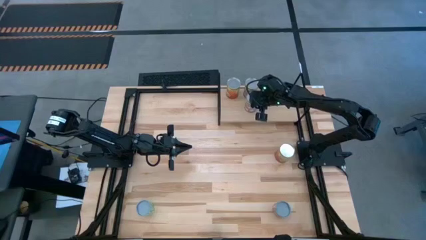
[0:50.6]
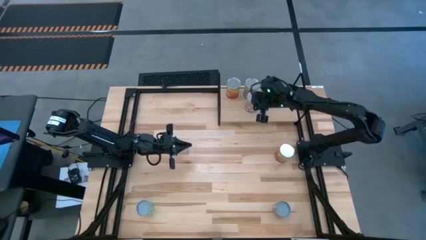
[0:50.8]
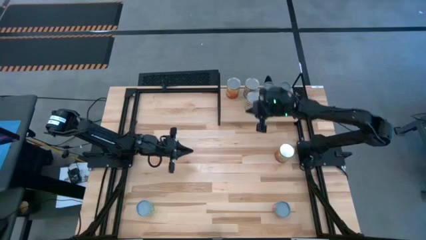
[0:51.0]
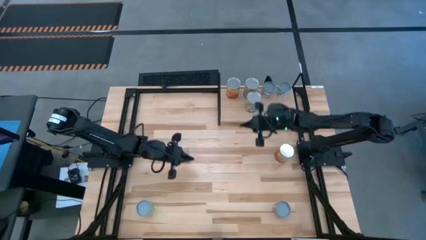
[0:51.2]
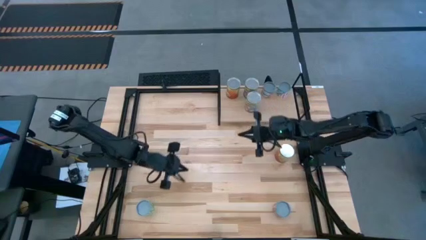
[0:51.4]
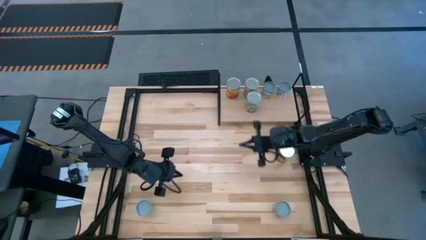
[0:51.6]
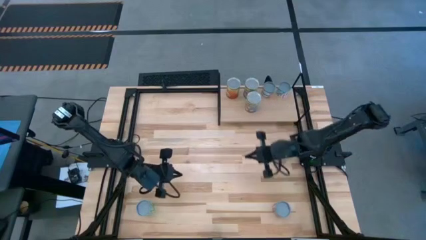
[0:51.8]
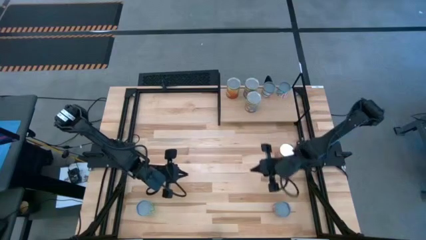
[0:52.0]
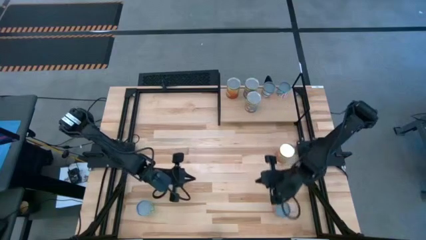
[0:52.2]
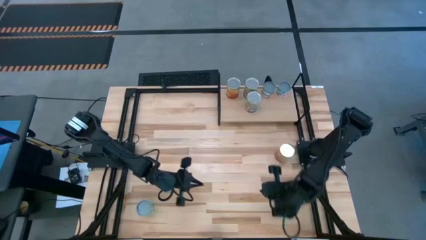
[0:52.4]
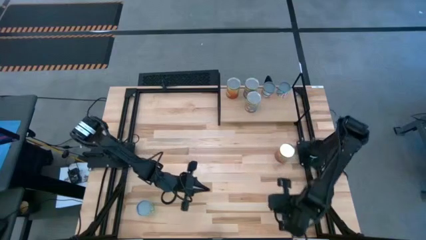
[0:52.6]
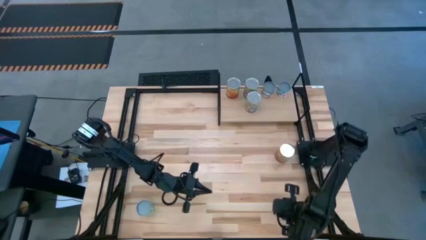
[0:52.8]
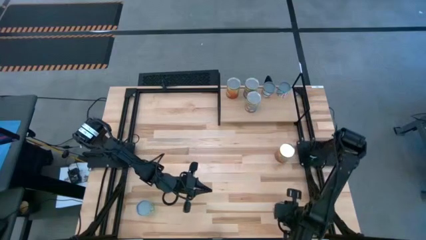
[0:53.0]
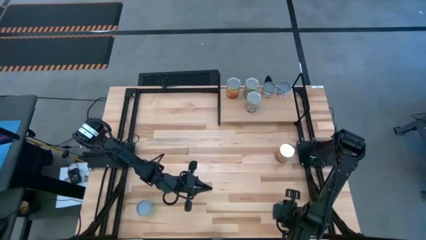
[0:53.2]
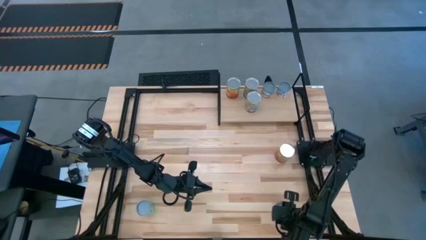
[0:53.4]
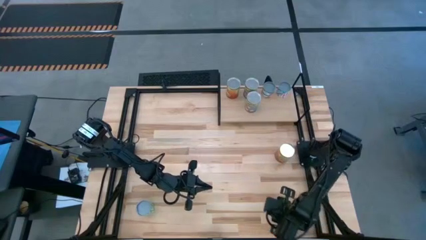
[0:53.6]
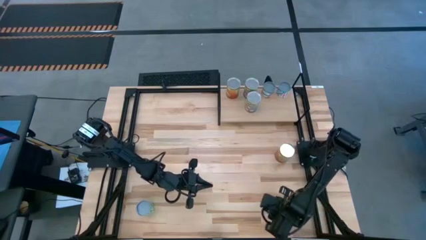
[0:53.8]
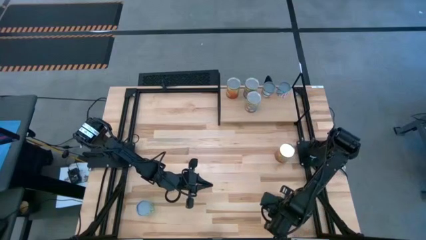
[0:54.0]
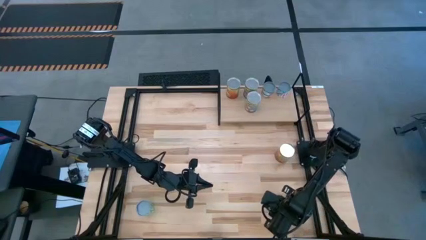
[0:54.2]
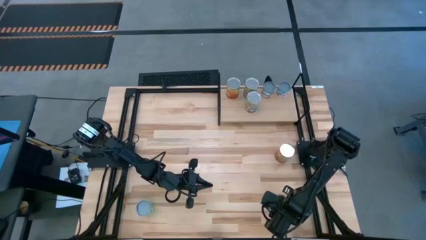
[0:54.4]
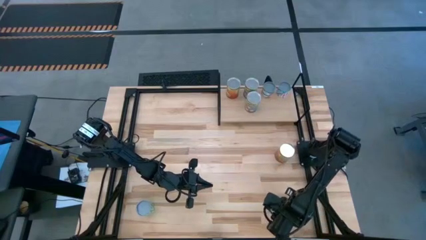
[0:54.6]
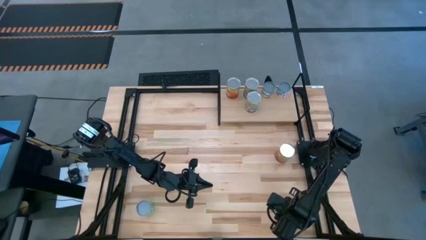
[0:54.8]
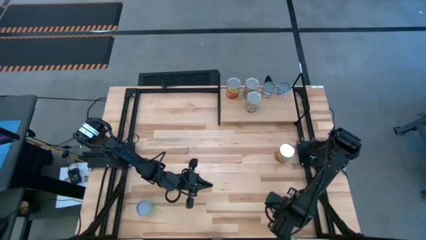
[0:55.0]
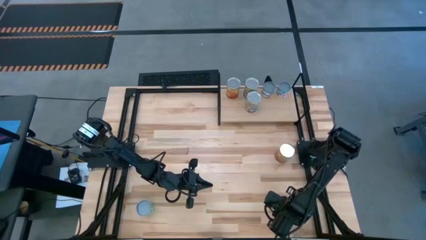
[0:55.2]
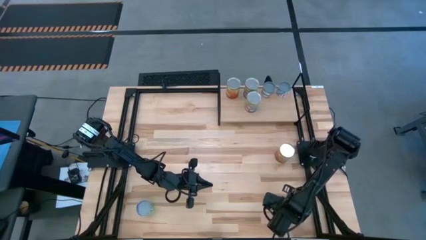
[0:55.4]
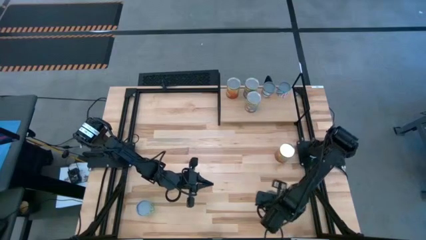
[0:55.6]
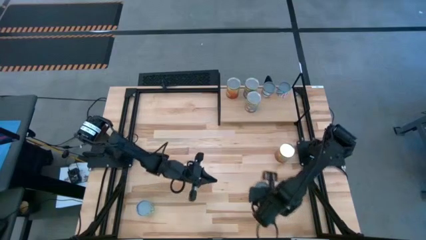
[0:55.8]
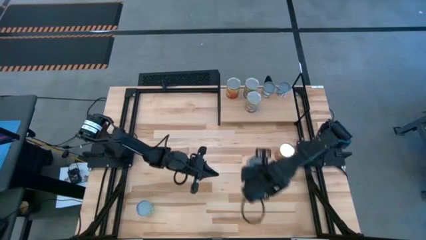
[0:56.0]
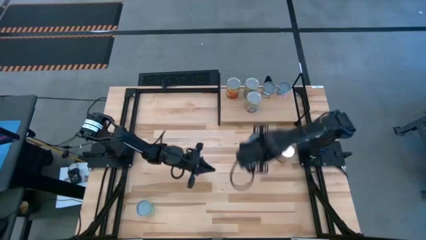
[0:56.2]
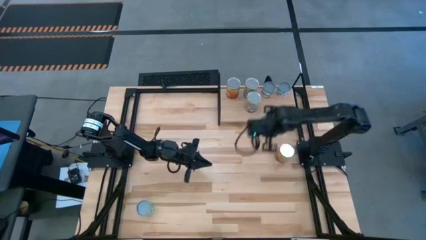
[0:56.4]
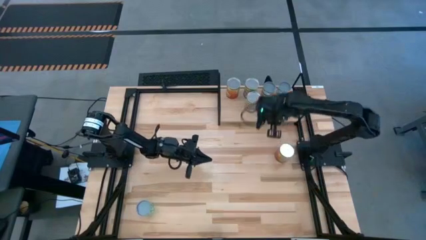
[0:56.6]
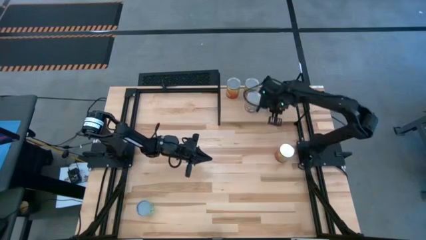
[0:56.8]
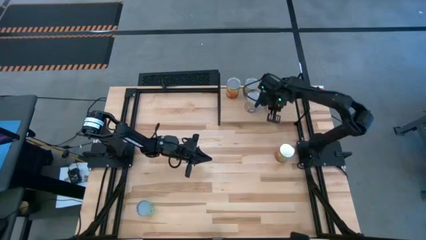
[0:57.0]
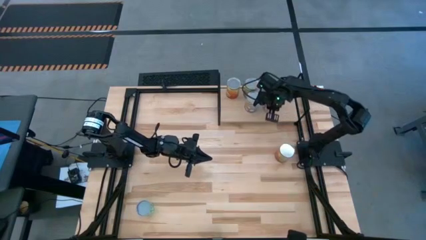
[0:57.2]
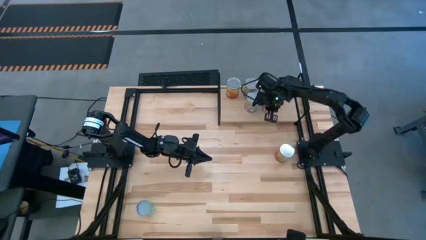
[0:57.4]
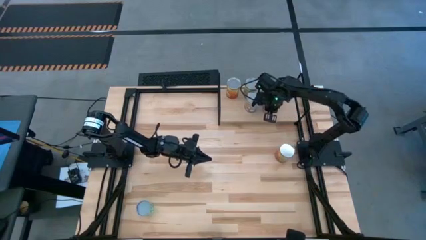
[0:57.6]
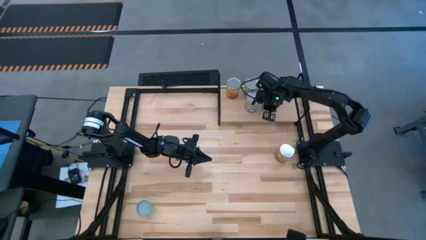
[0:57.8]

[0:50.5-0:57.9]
Task: Pick and place cans onto a shelf
Put the blue can on the shelf

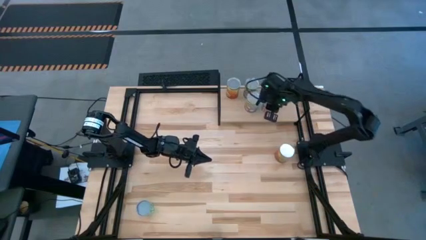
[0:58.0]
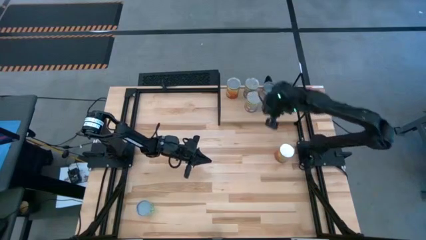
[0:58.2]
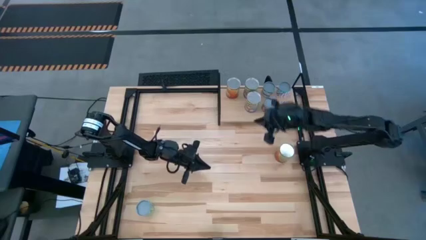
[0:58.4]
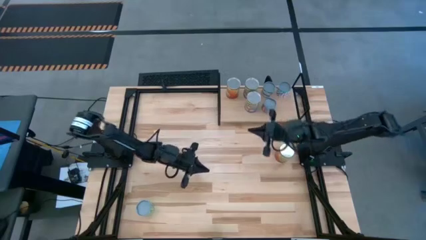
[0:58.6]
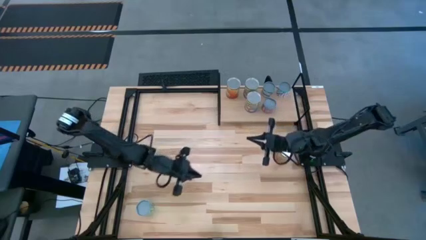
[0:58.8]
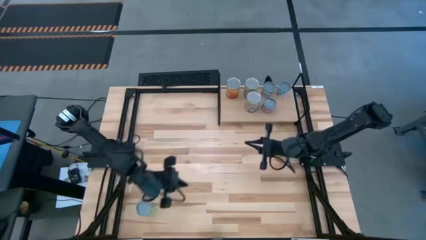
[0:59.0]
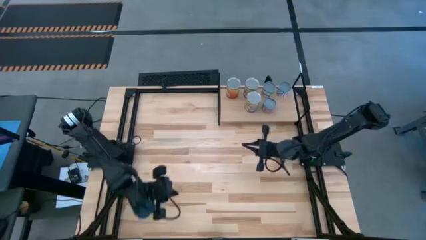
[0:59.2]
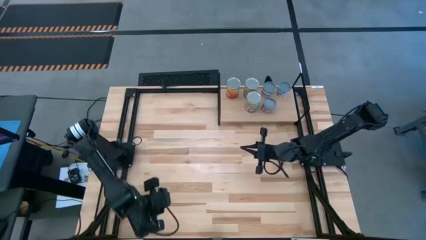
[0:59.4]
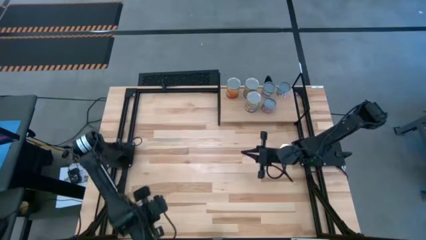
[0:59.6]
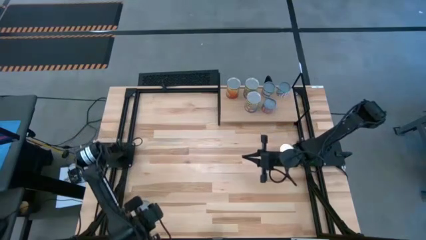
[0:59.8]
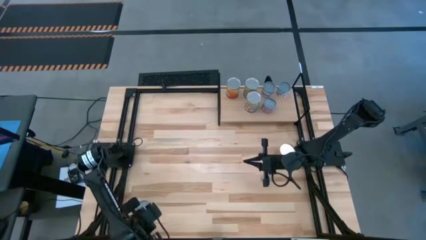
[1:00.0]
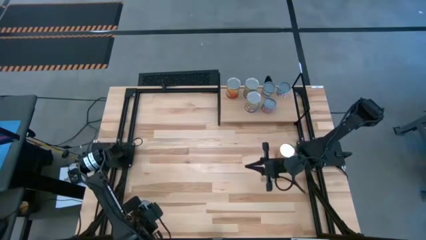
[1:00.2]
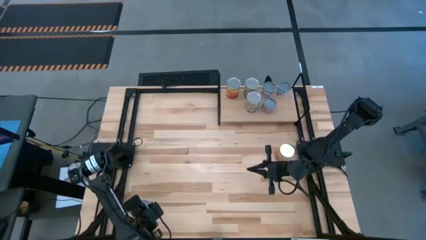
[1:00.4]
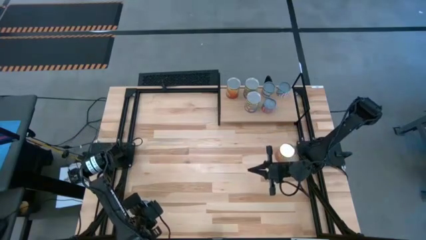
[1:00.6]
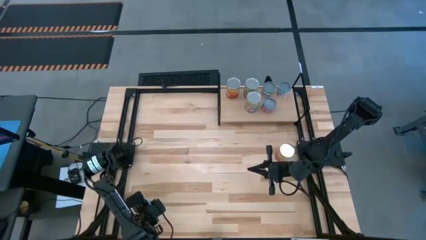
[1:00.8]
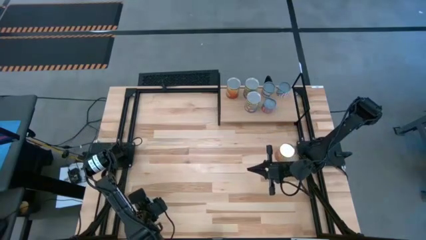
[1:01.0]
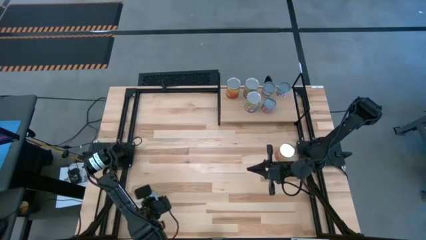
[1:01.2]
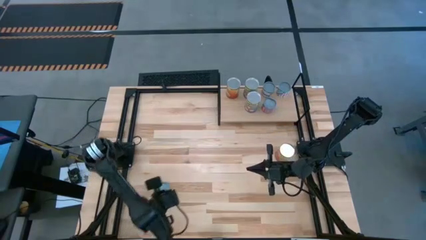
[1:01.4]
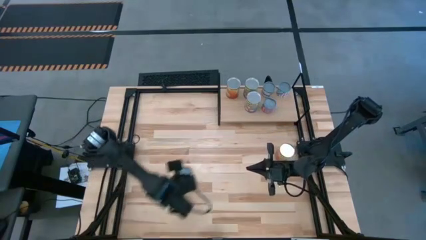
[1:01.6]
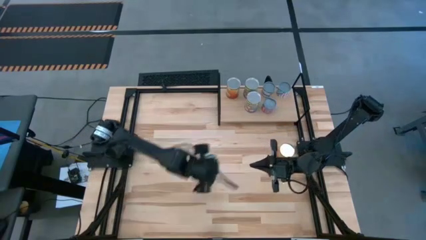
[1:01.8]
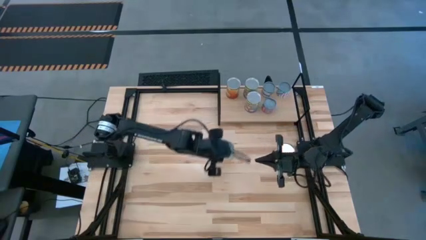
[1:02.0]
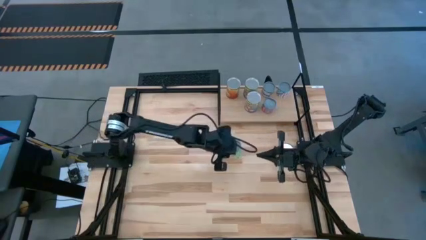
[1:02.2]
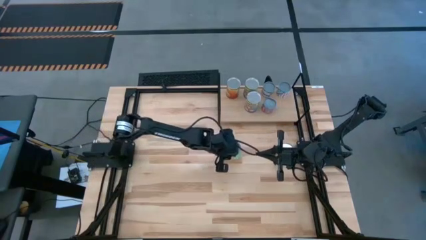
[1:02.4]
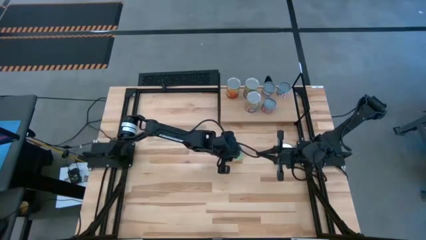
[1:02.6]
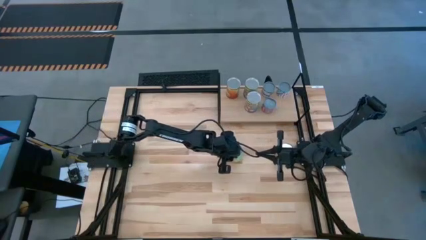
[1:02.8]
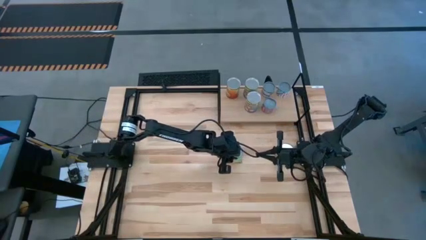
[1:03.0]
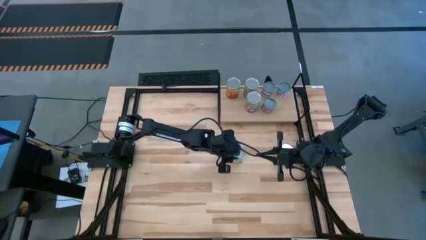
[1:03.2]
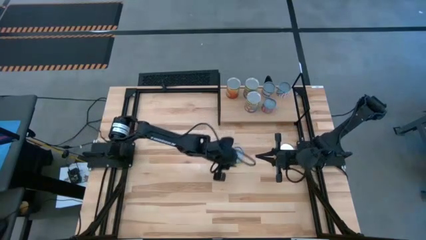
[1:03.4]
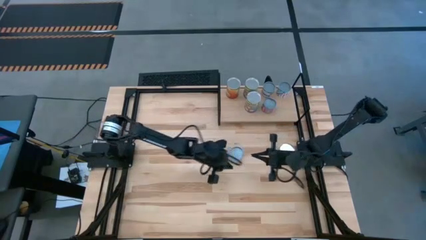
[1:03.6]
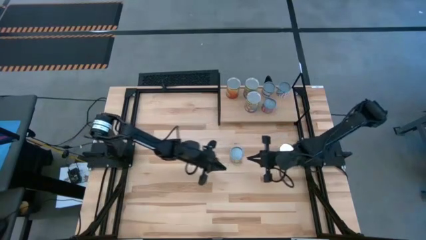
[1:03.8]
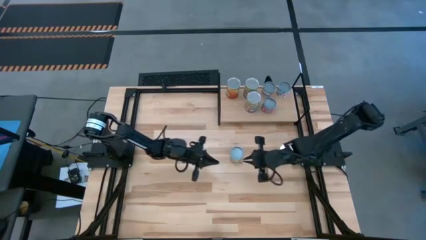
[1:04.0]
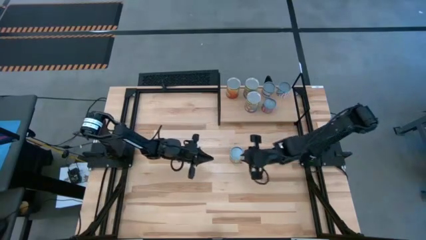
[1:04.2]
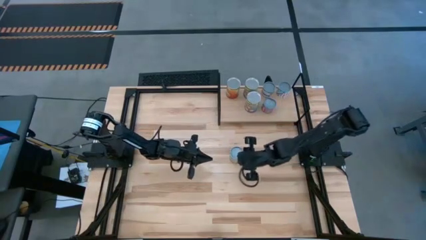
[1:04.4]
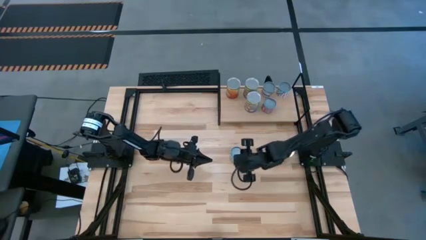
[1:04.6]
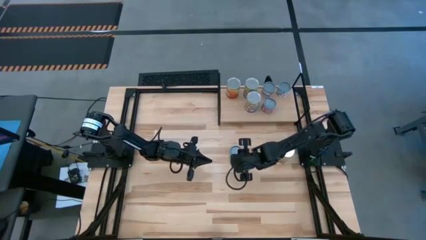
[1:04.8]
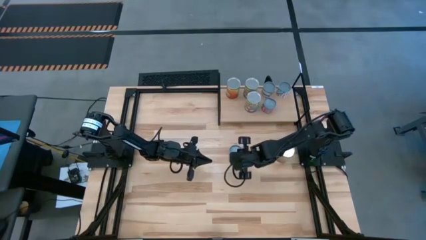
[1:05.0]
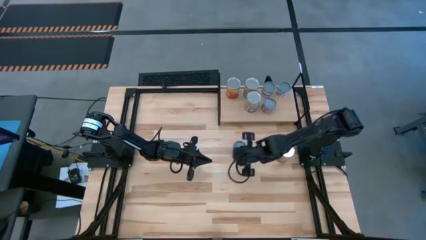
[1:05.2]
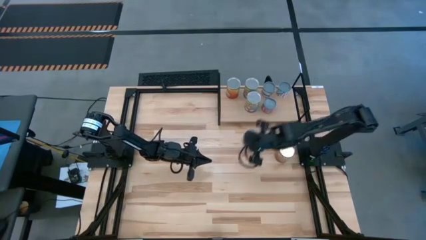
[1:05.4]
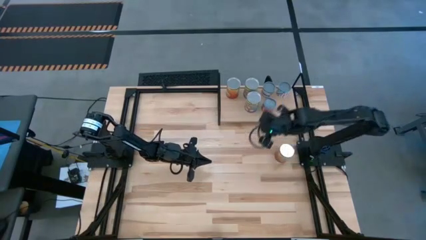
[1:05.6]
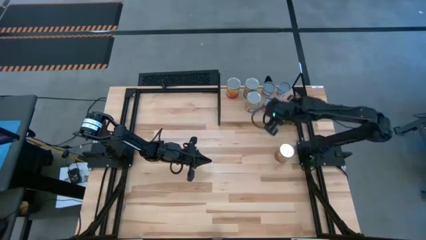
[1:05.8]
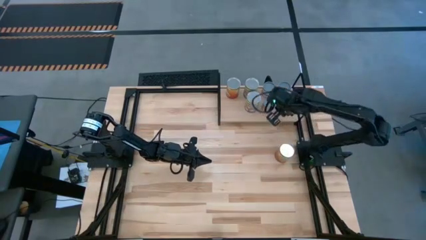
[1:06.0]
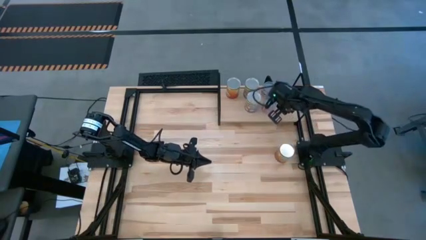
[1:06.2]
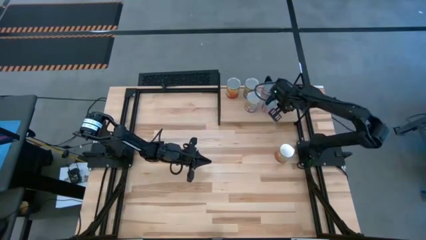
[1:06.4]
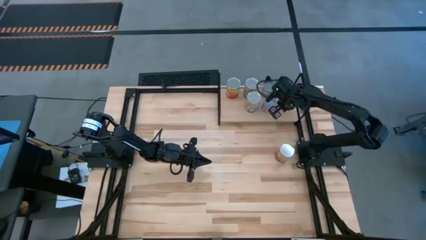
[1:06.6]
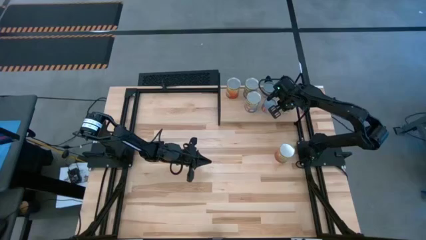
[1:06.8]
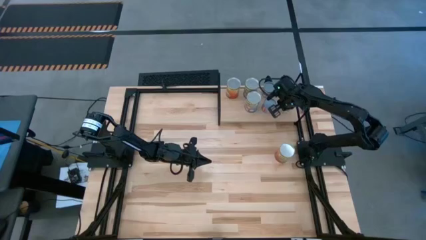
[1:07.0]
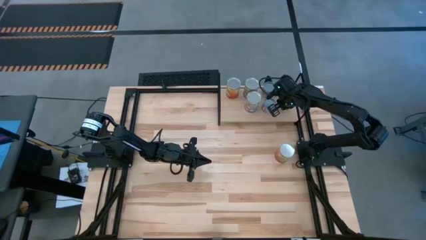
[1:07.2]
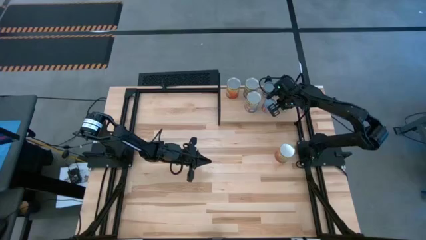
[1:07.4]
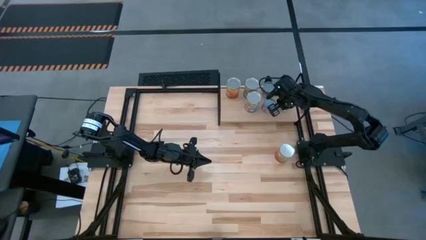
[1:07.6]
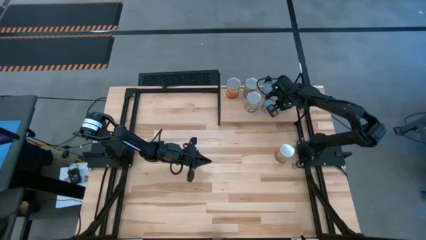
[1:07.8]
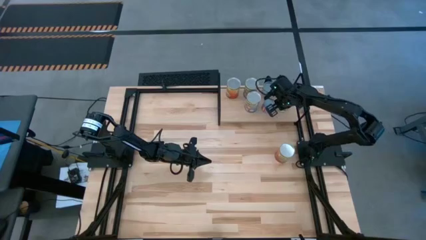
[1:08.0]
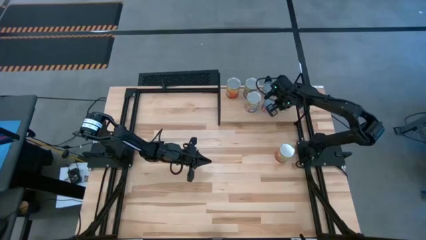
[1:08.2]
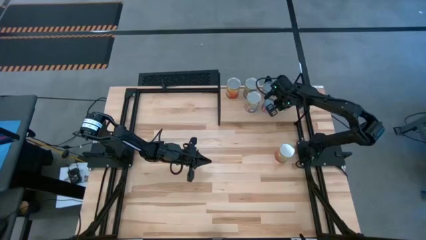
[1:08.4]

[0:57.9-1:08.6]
Put the light green can on the shelf
